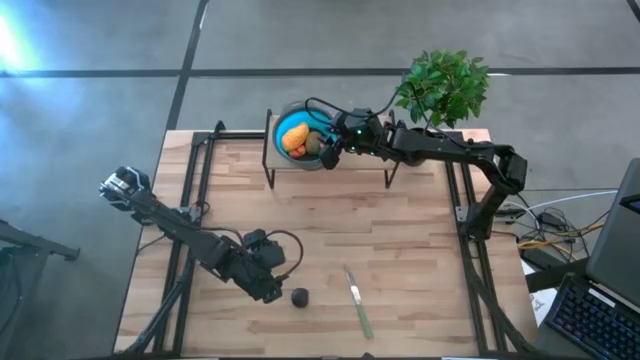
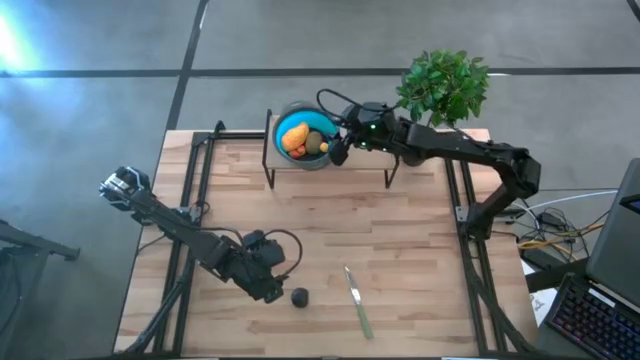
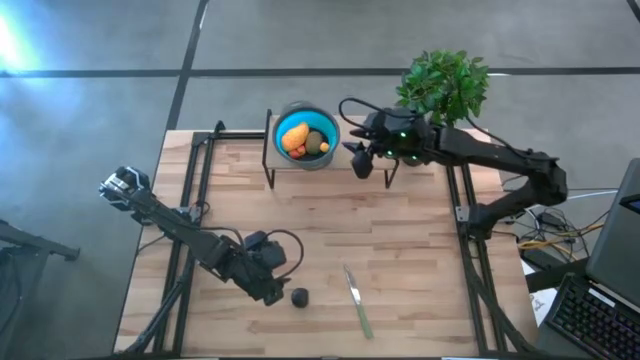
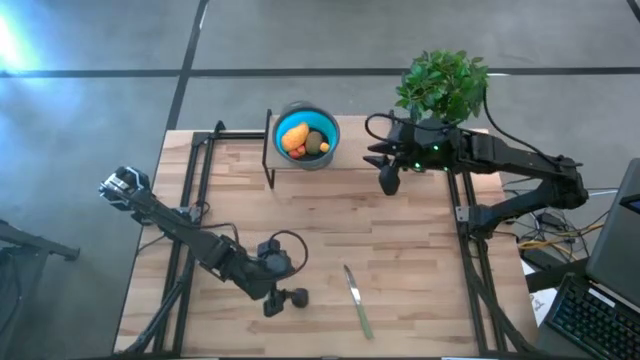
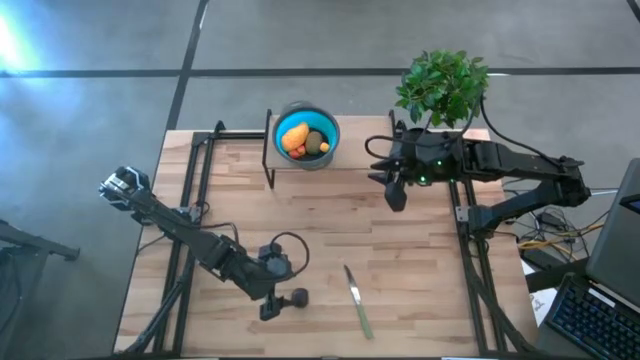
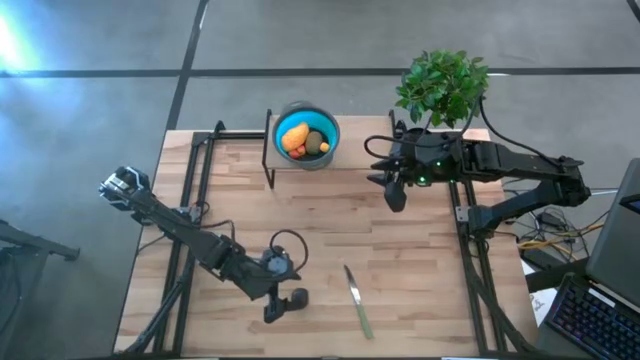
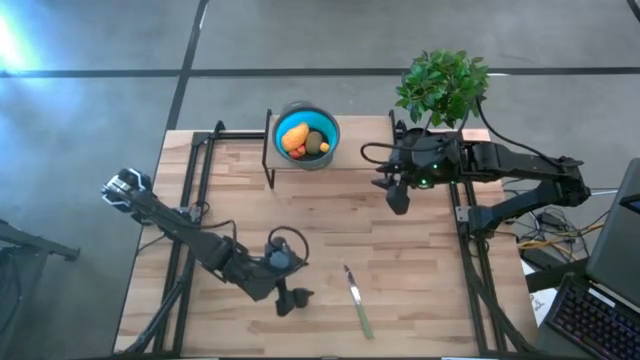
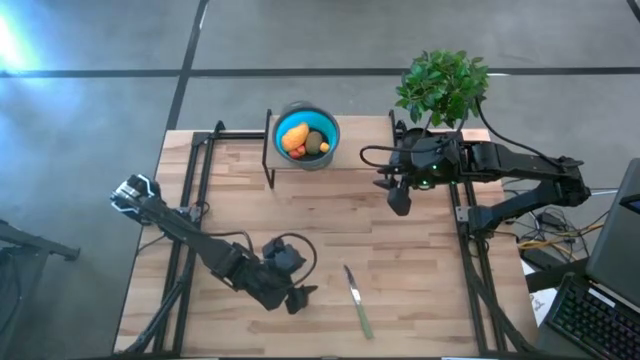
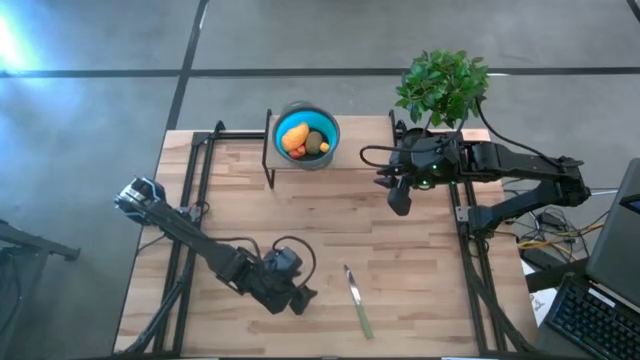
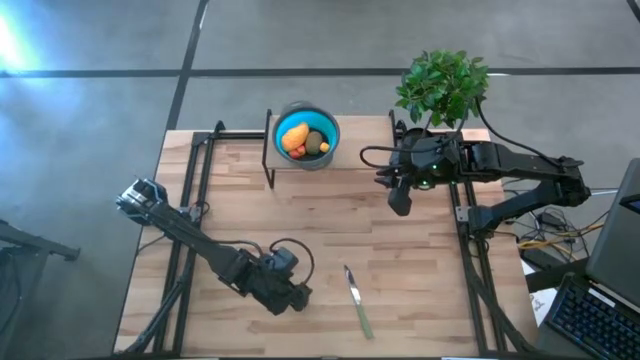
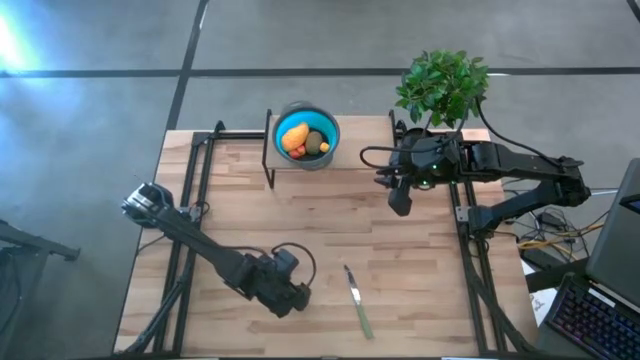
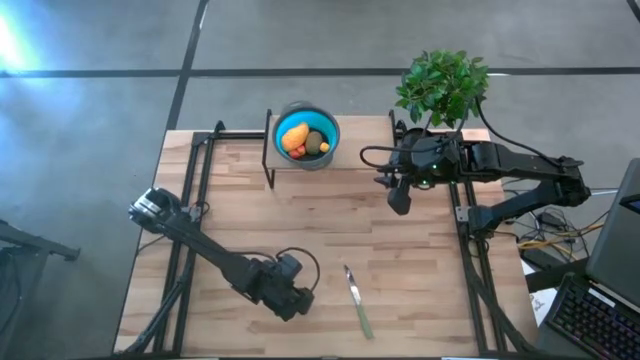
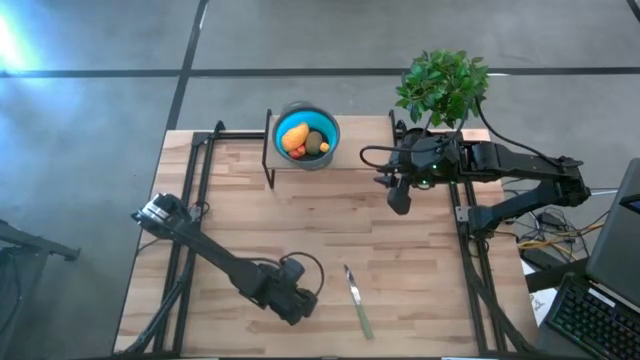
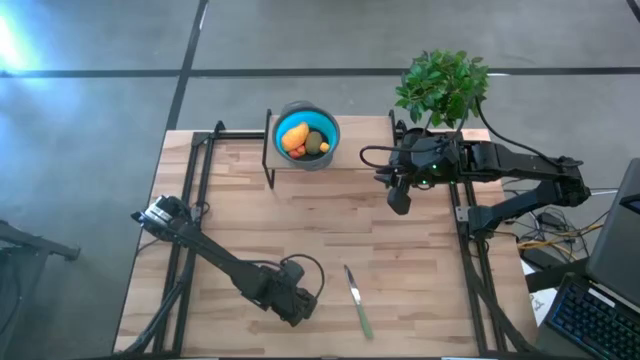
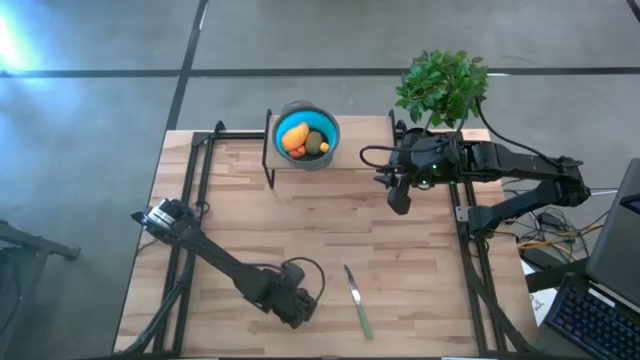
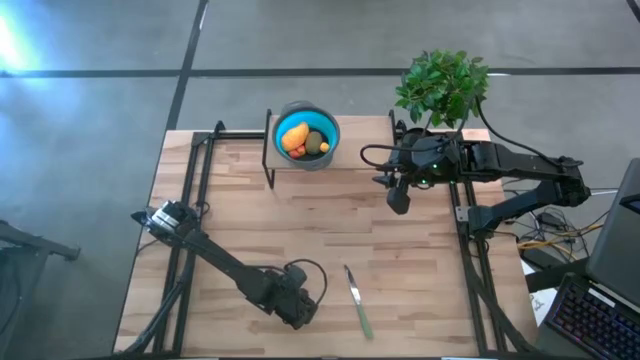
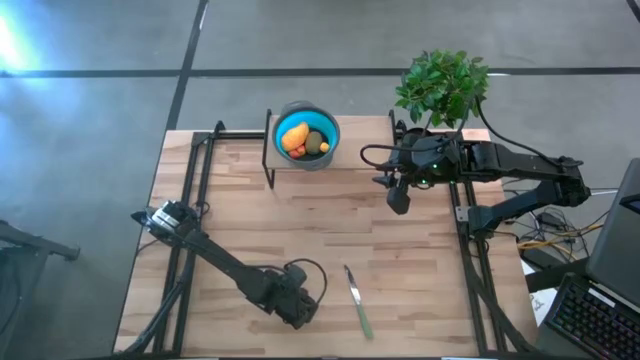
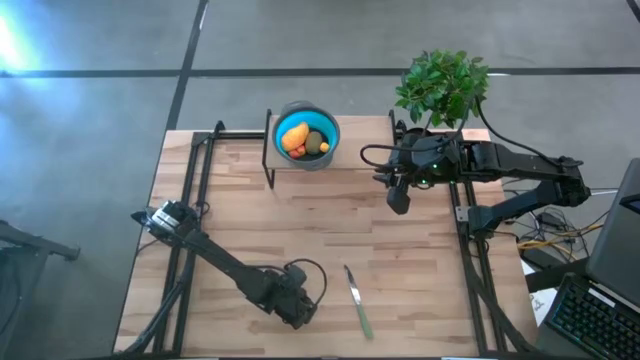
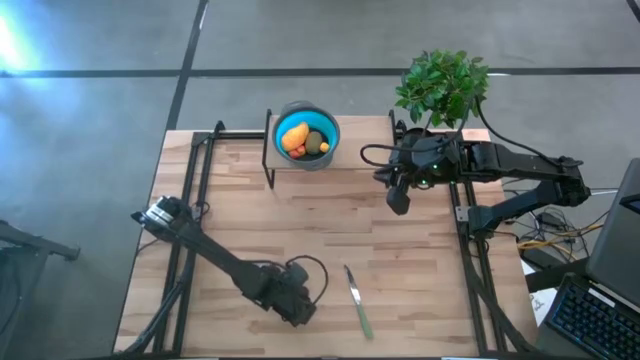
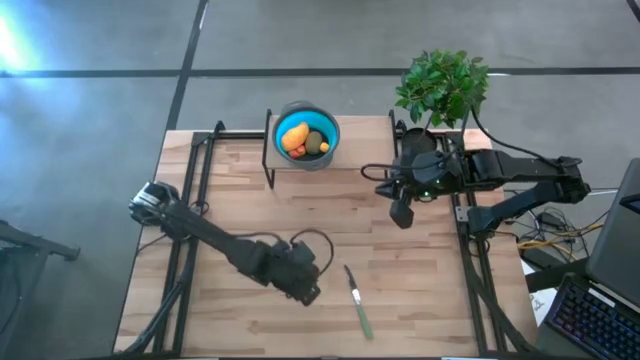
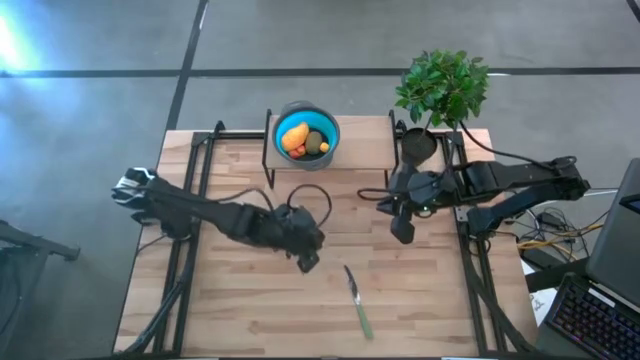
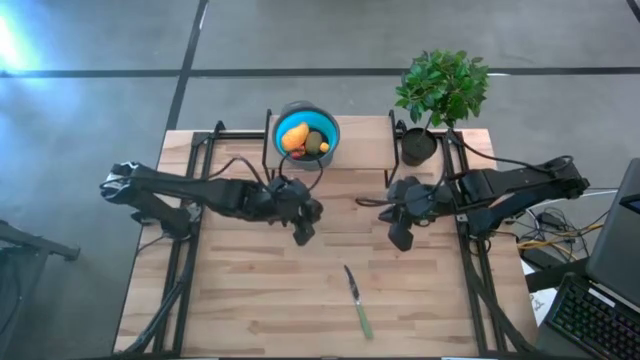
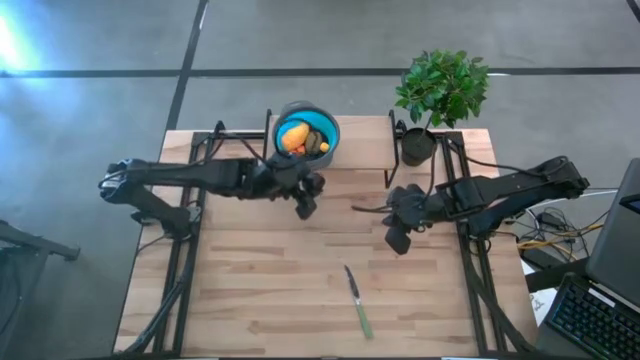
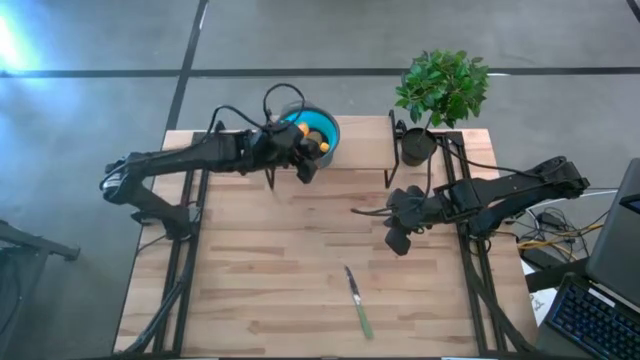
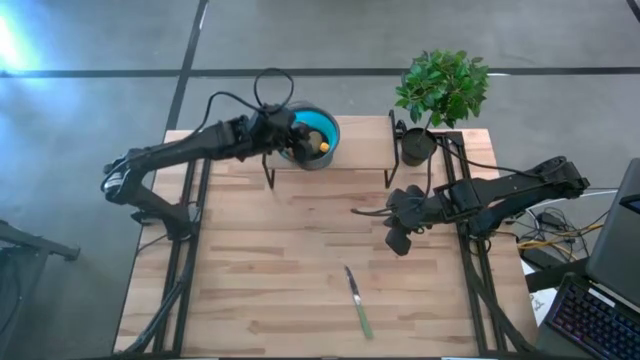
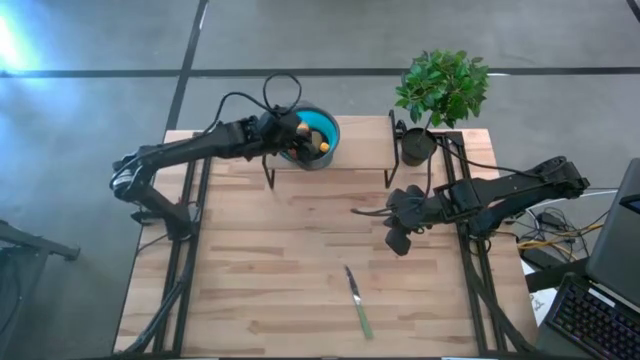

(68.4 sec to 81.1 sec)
Task: Pick & Place Fruit
Put the purple plum into the blue strainer bowl

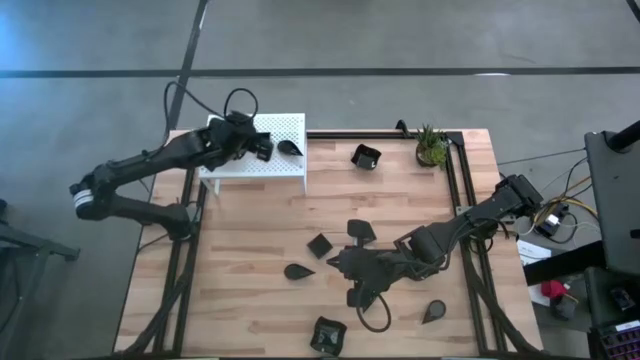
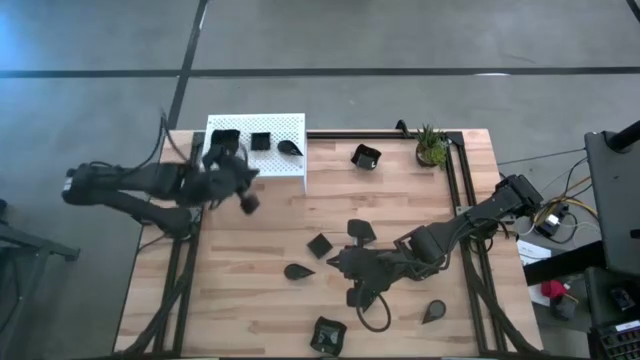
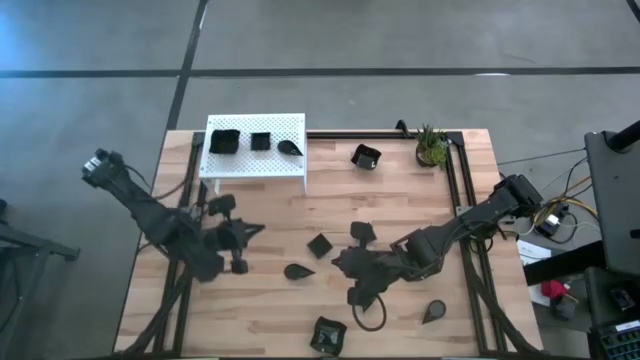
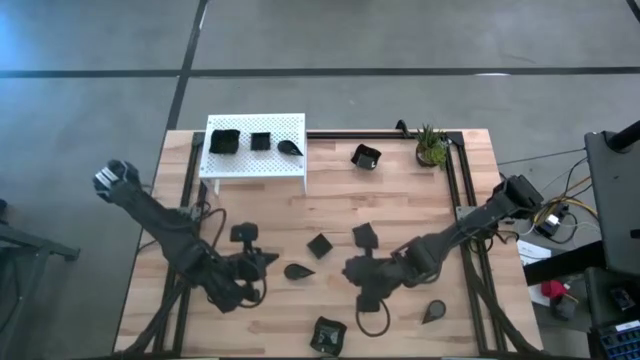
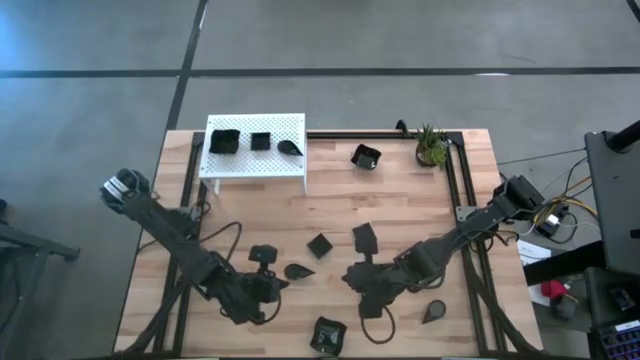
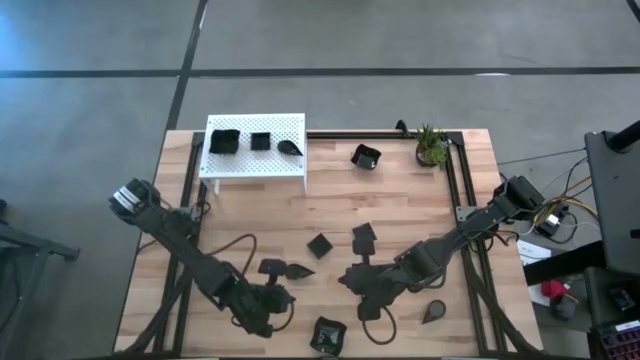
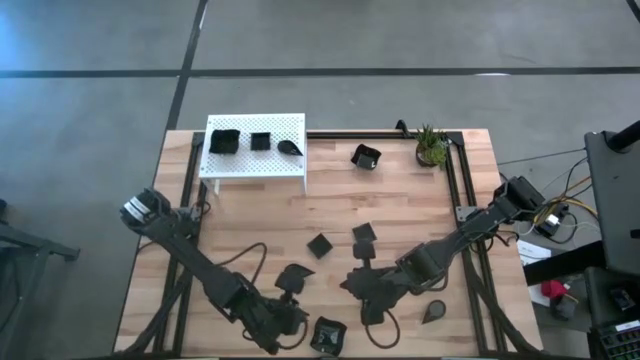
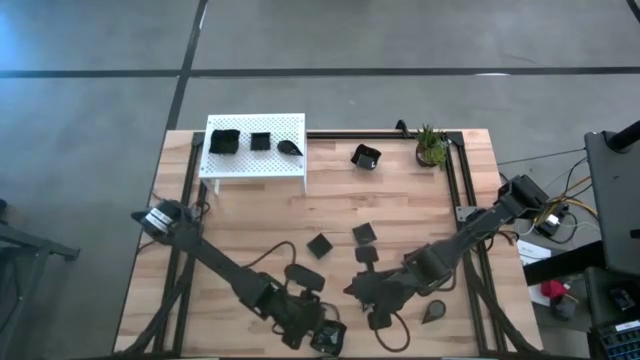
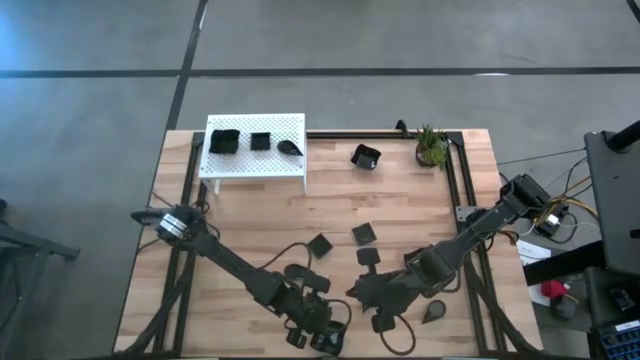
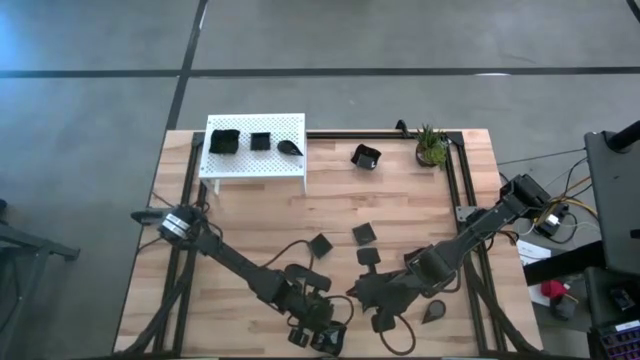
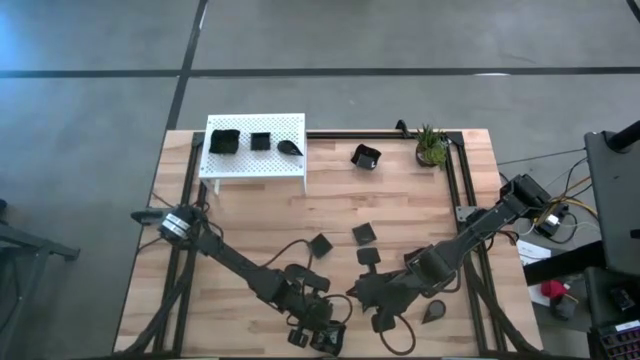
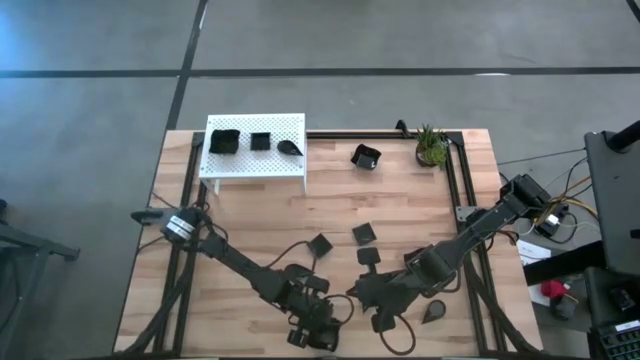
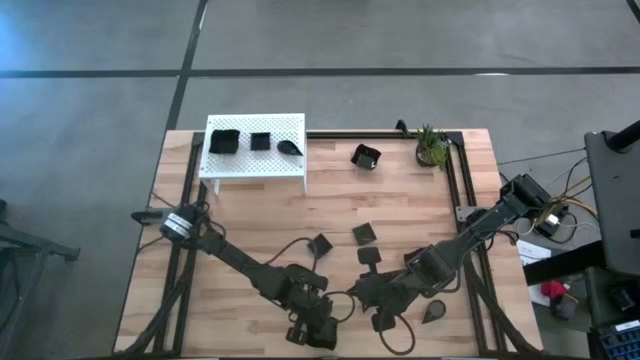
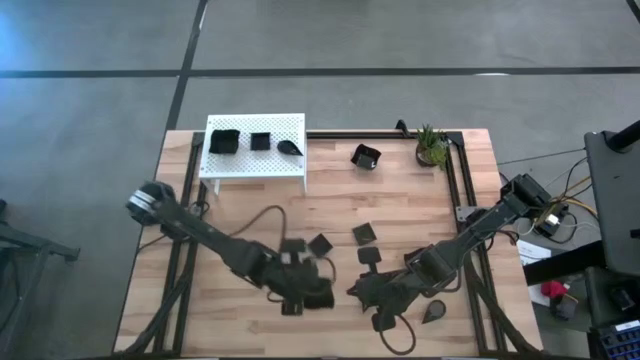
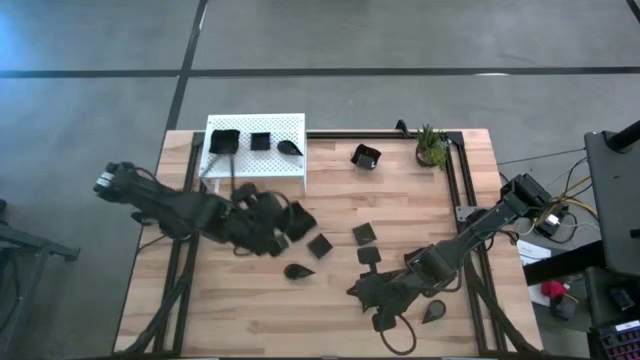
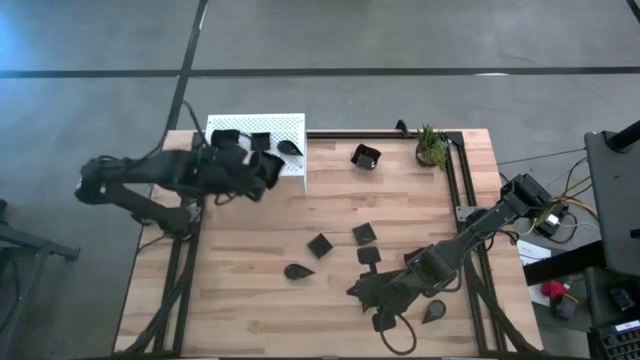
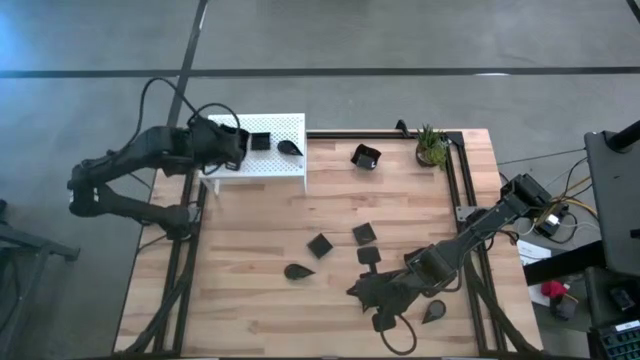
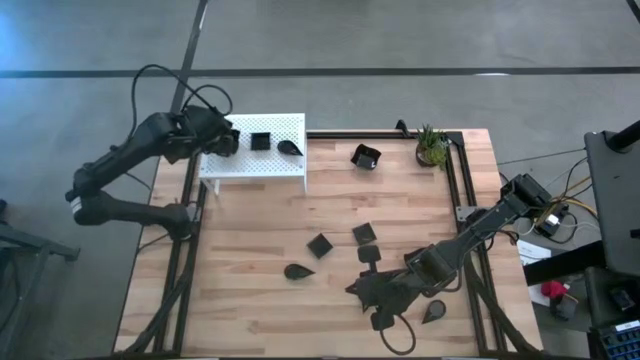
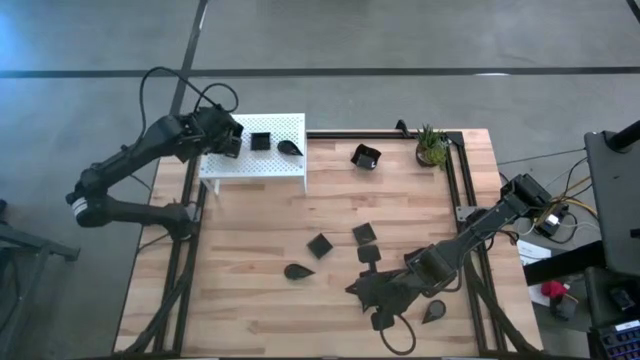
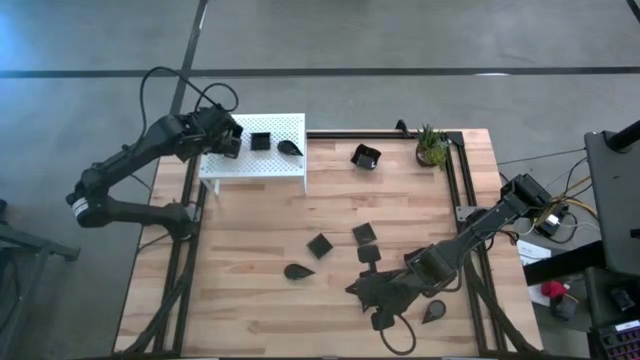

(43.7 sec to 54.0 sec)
Task: Pick & Place Mini shaped plates
Stack the distorted square plate on top of the other distorted square plate on the shelf
